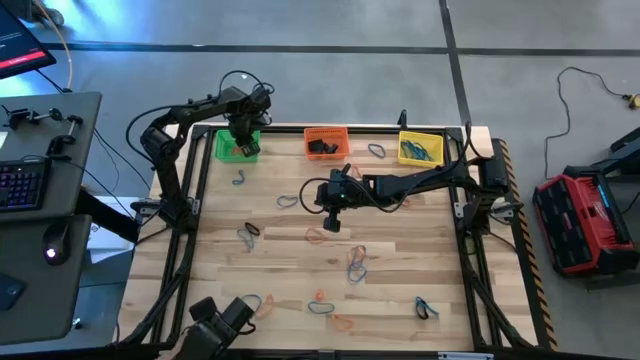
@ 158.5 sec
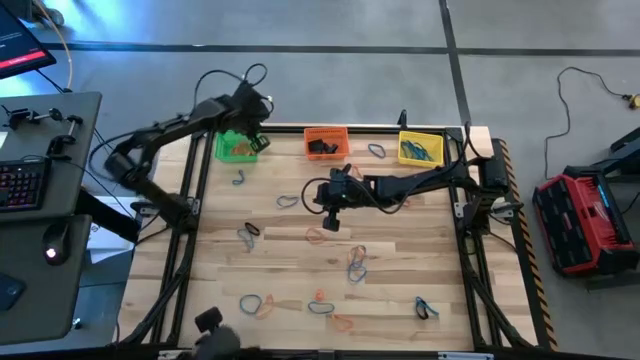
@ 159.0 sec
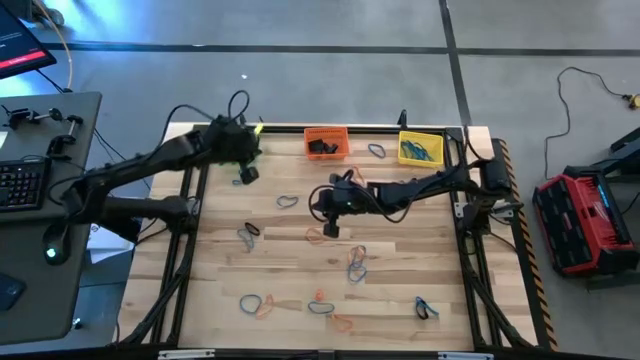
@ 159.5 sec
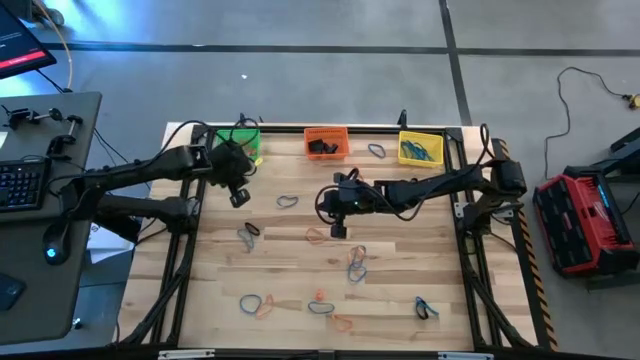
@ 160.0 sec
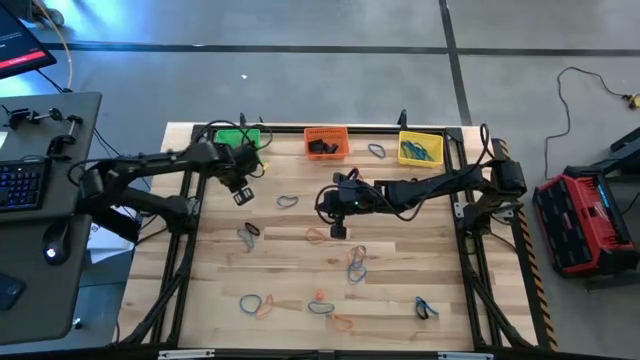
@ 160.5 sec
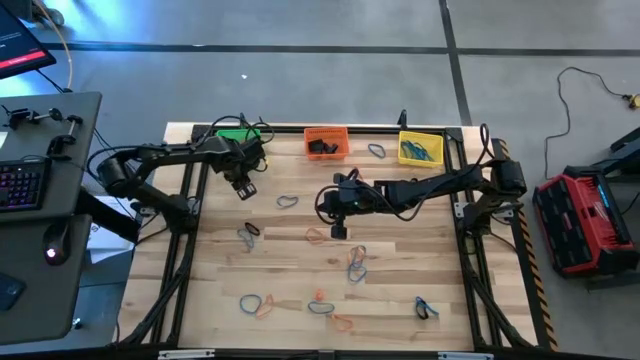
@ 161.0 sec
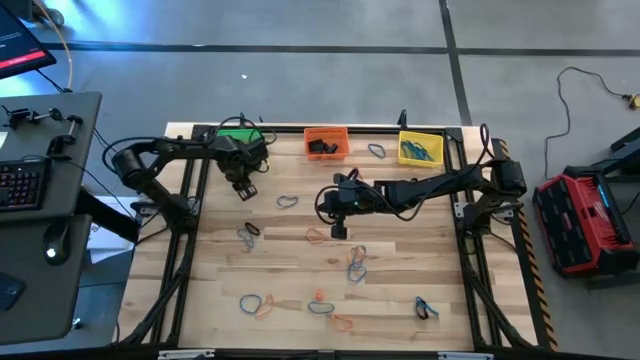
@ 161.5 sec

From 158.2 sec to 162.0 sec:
Task: Sort rubber bands into baskets
Put the blue rubber band into the yellow bin

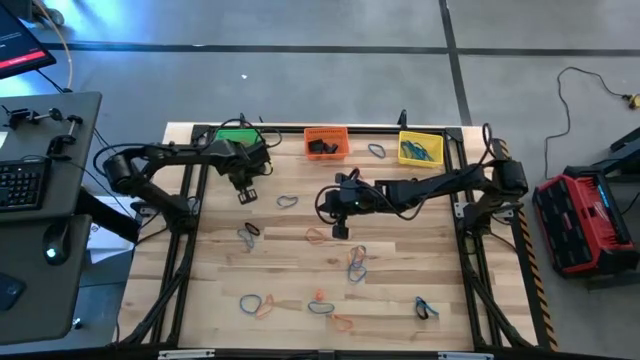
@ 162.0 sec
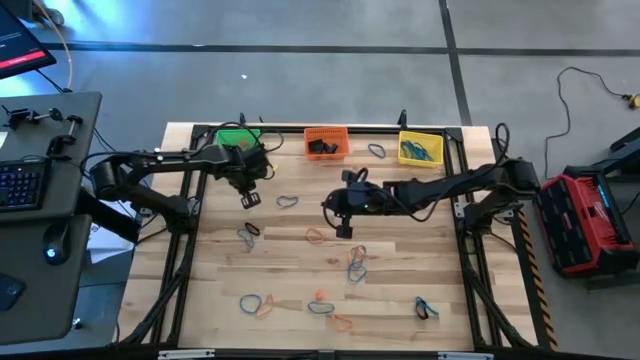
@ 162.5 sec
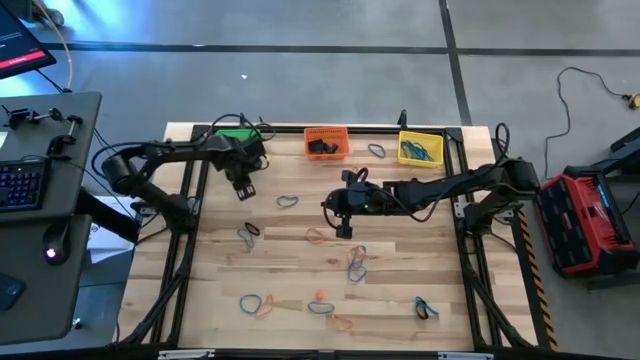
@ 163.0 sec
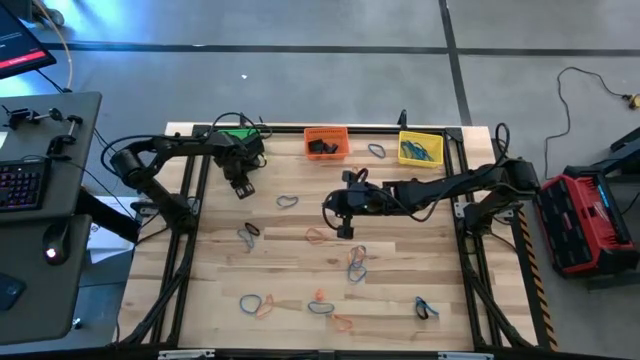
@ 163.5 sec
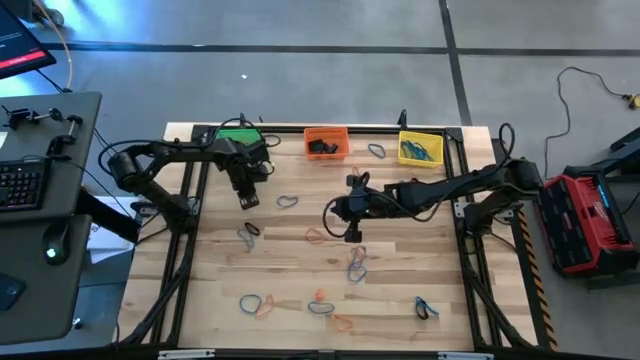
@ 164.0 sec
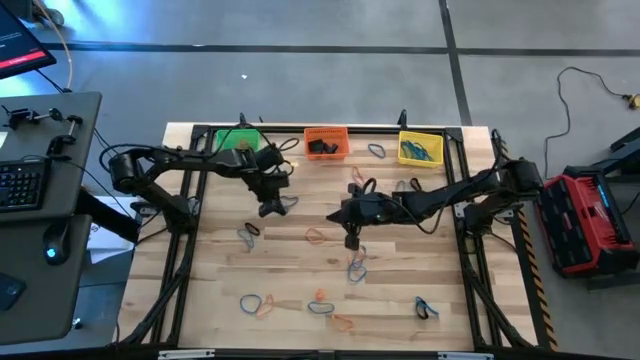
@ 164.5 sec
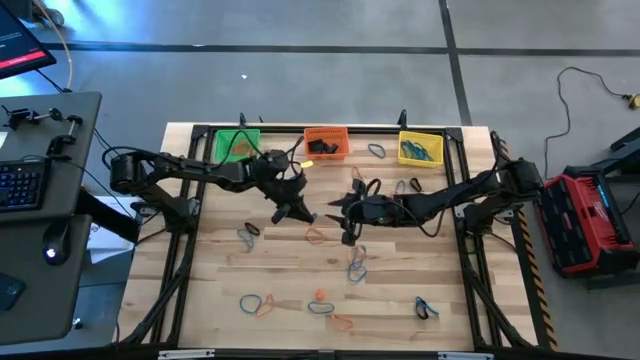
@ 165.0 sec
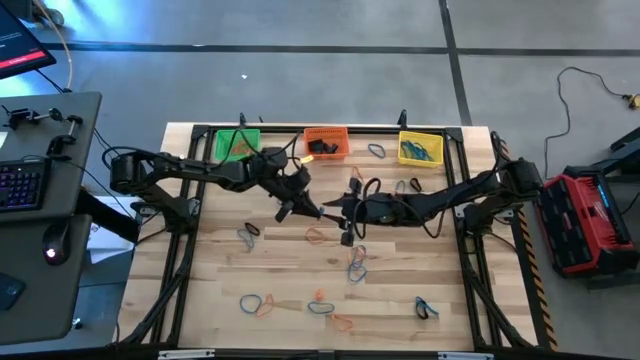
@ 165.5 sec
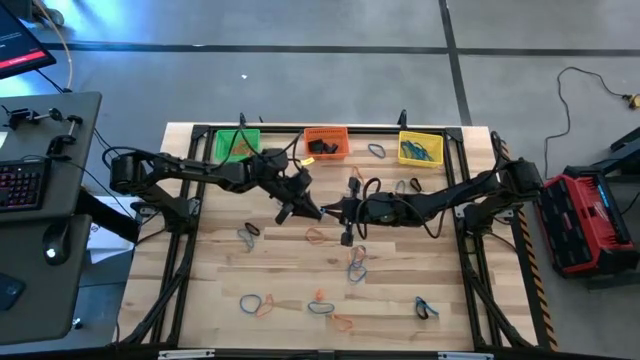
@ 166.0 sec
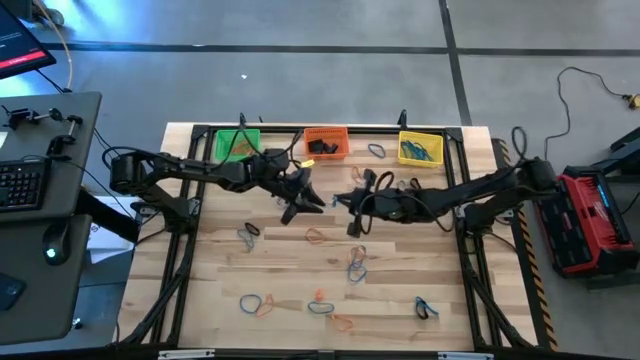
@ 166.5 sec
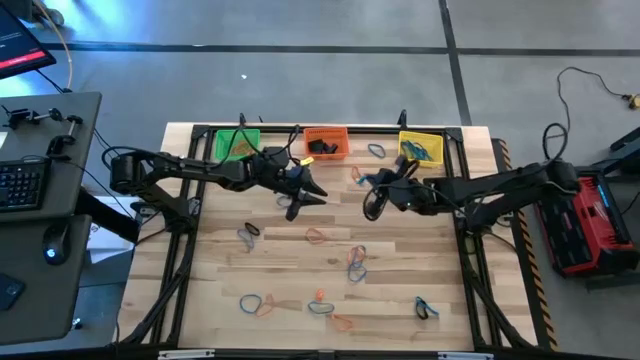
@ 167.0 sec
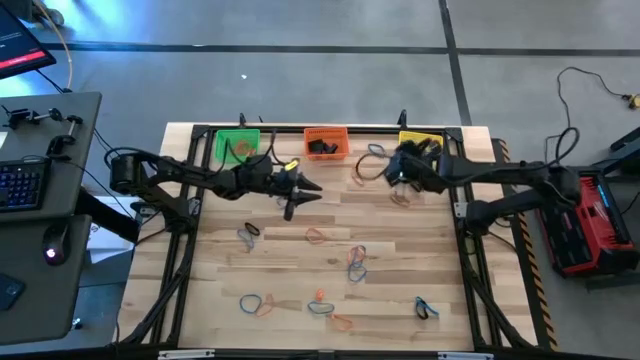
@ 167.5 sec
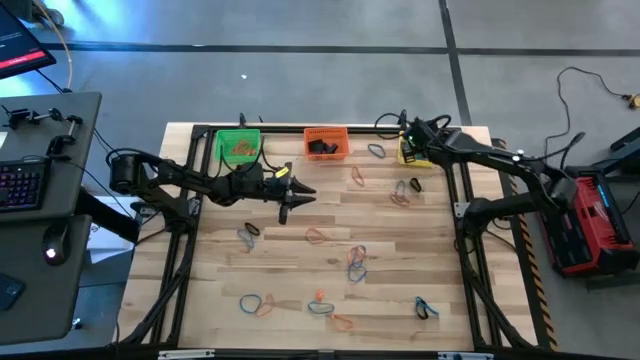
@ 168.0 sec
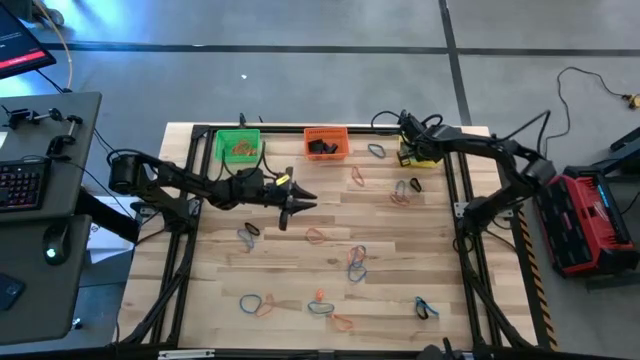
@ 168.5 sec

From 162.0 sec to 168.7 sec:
Put the blue rubber band into the yellow bin

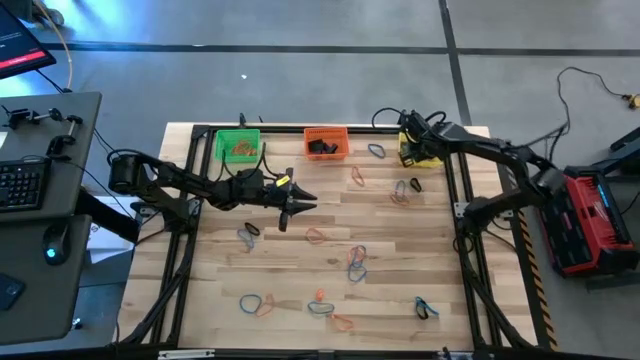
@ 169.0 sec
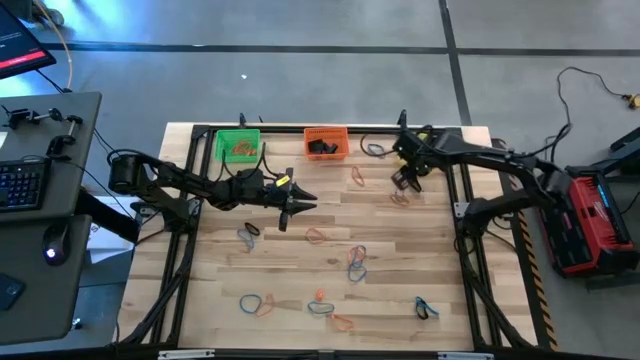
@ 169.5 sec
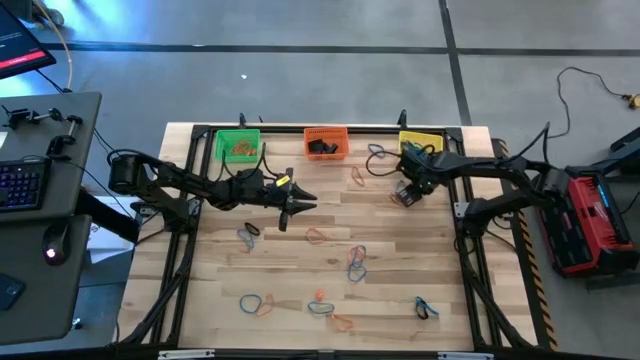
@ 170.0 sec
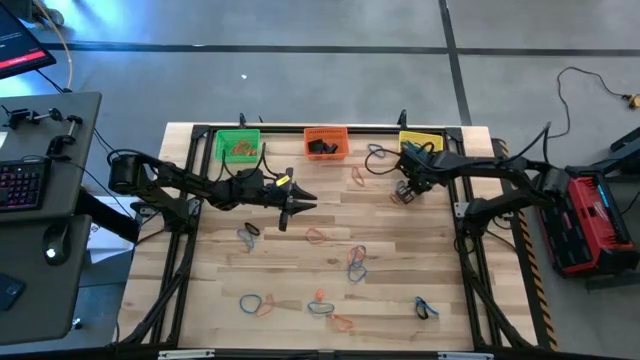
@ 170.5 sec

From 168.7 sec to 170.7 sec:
Put the black rubber band into the orange bin

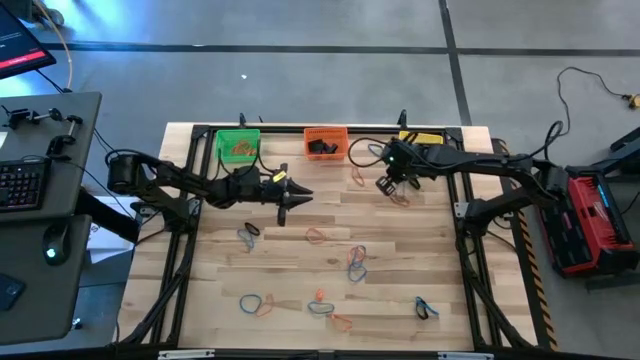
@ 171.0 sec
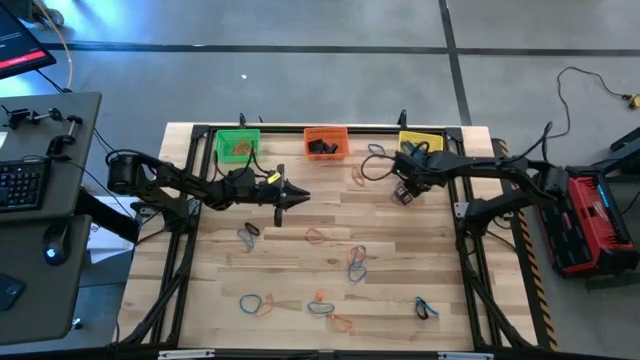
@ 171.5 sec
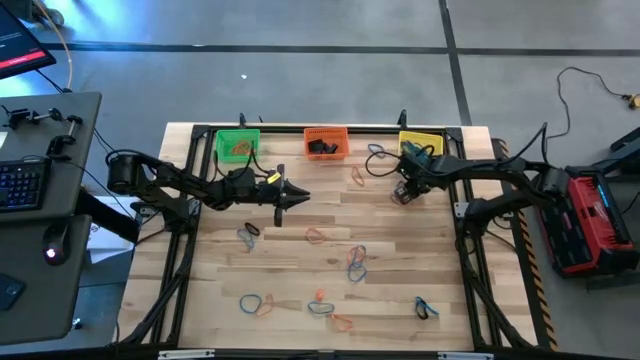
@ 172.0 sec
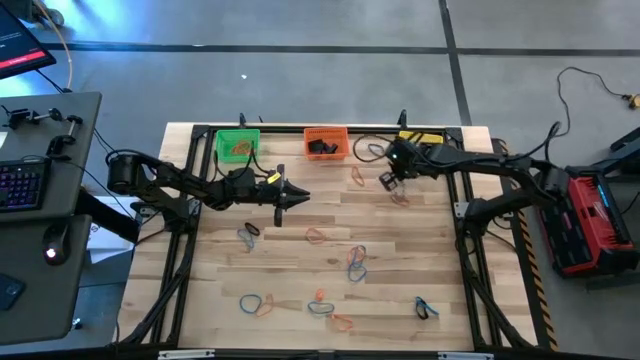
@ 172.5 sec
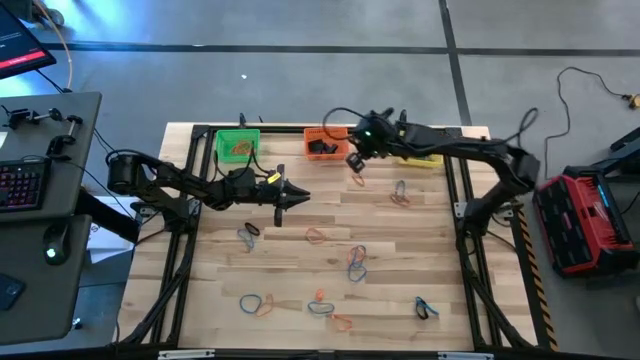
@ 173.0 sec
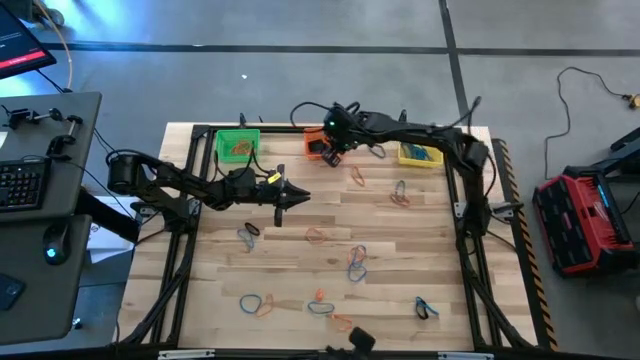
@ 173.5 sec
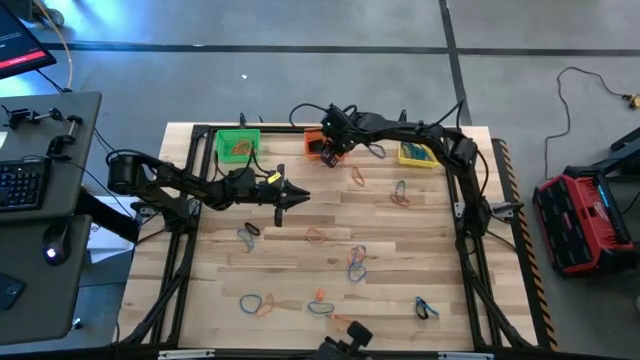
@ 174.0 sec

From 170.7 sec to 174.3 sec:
Put the black rubber band into the orange bin

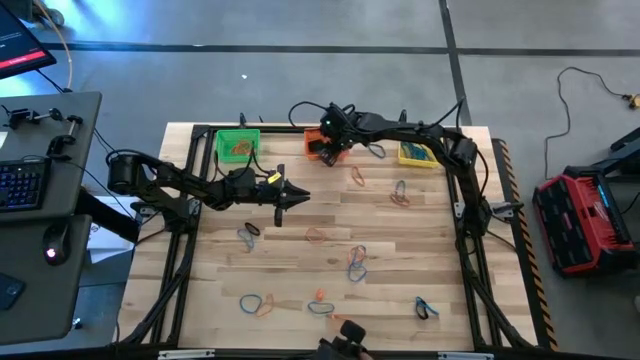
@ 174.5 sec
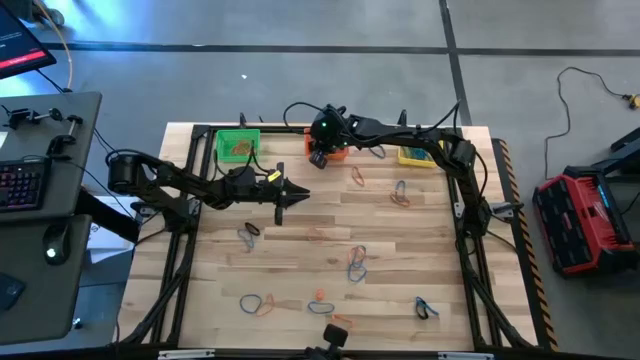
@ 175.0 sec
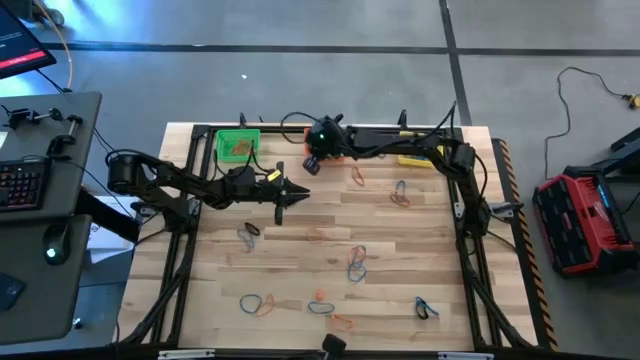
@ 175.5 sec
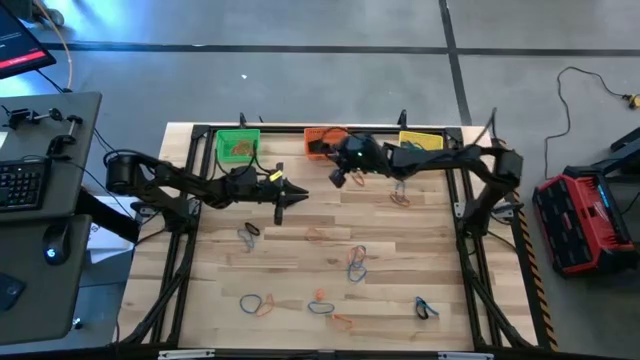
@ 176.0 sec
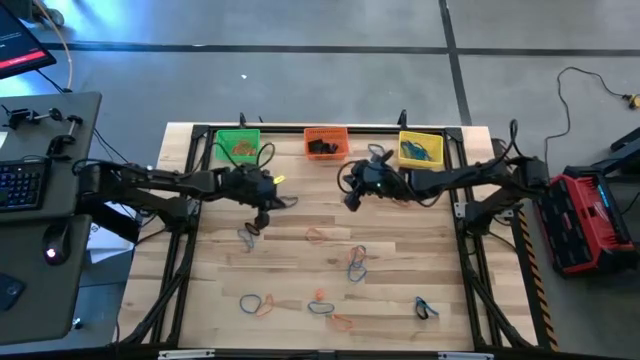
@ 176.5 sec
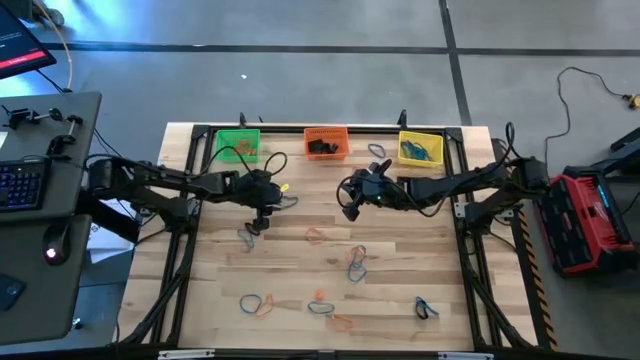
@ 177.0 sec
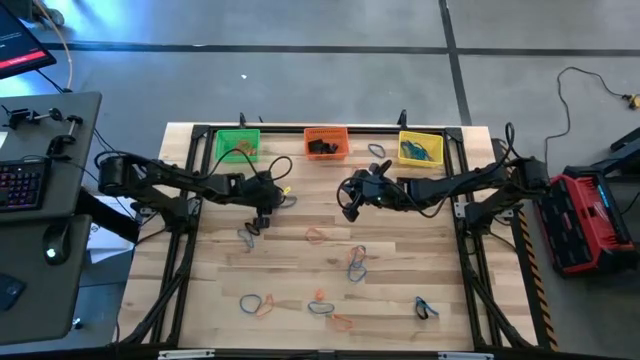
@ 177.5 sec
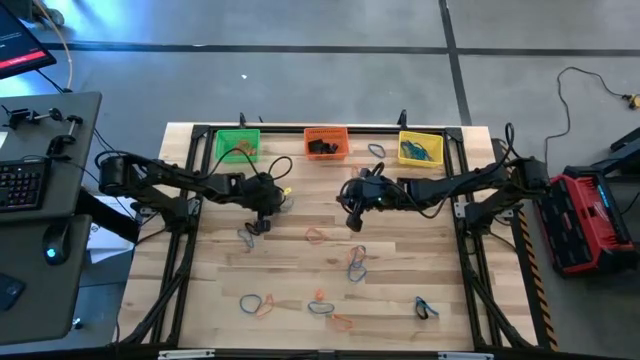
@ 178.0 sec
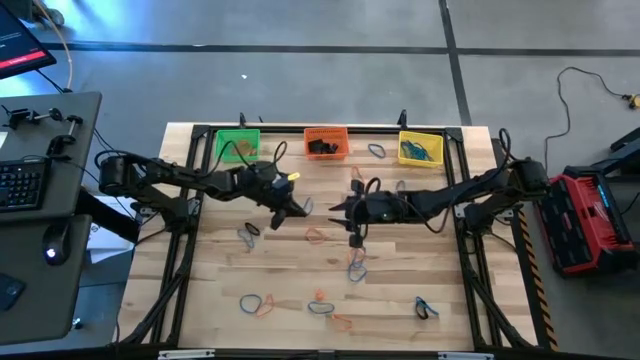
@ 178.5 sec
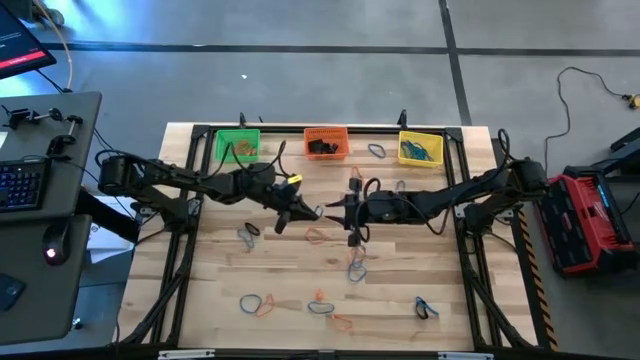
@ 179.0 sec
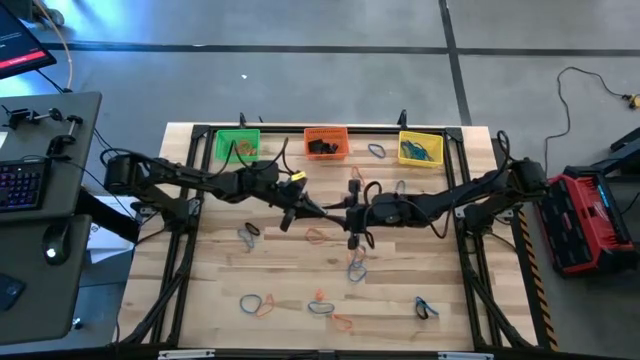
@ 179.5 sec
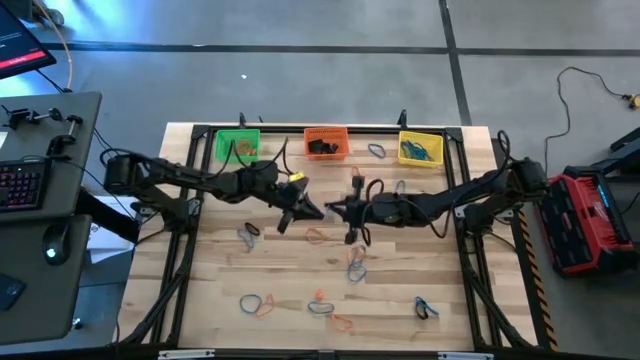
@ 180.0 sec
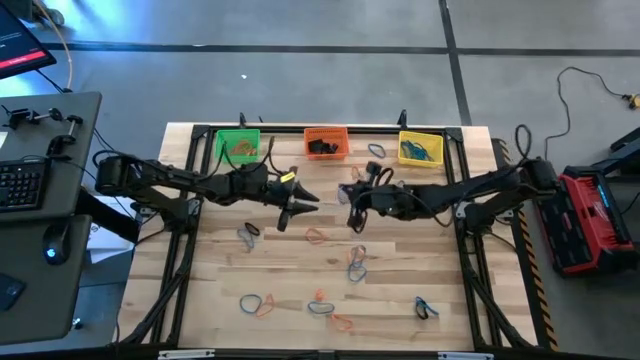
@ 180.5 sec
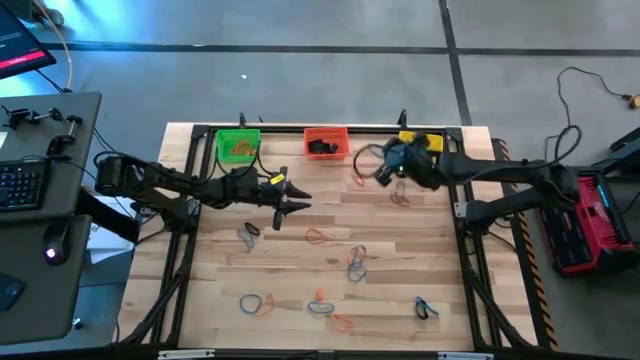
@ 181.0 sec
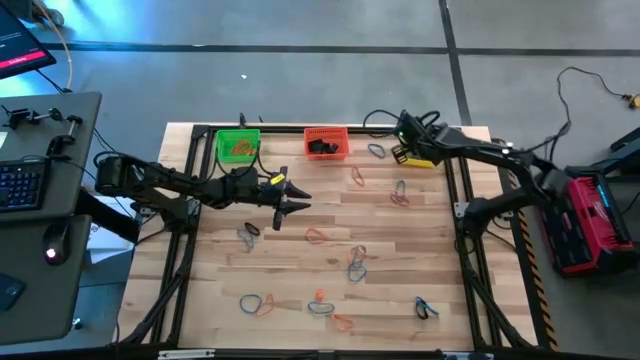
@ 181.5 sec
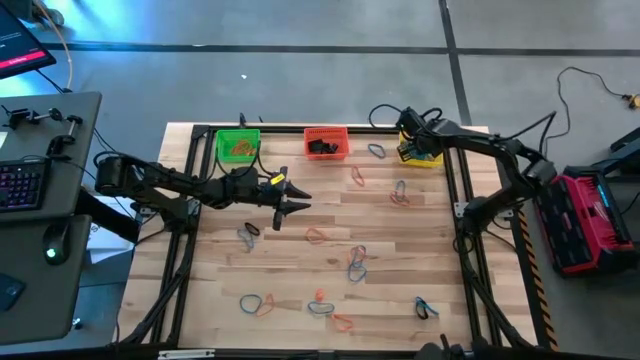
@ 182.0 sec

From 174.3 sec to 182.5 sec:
Put the blue rubber band into the yellow bin
